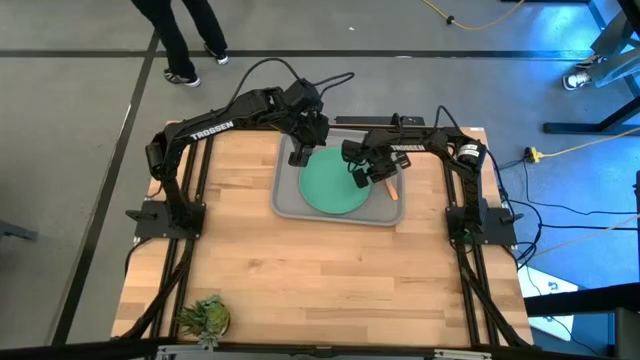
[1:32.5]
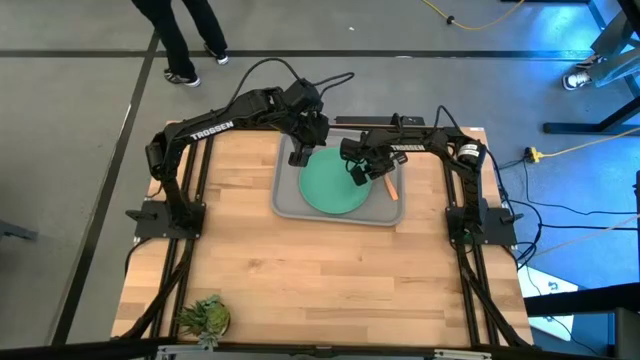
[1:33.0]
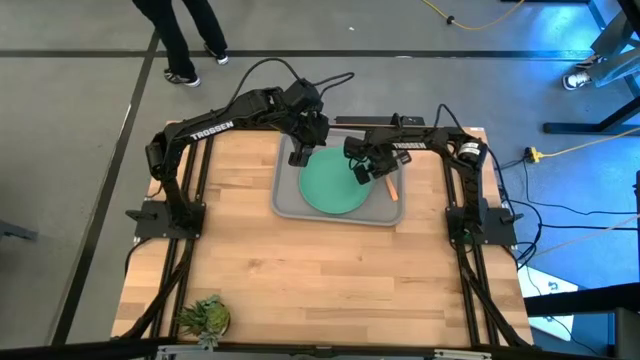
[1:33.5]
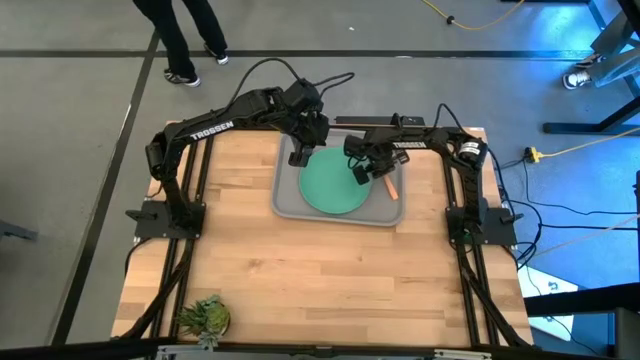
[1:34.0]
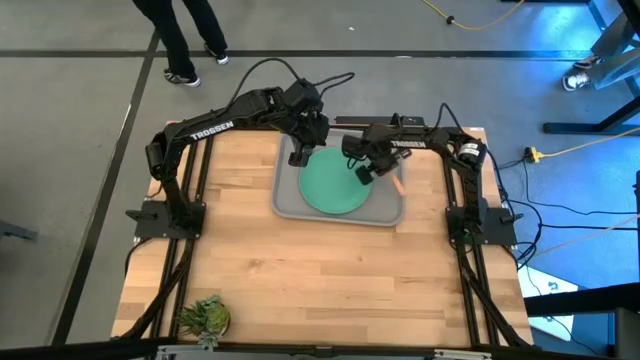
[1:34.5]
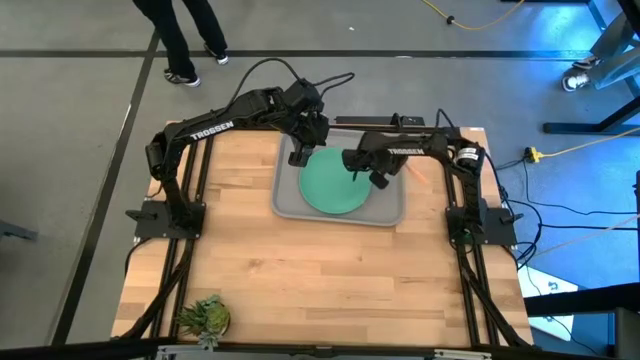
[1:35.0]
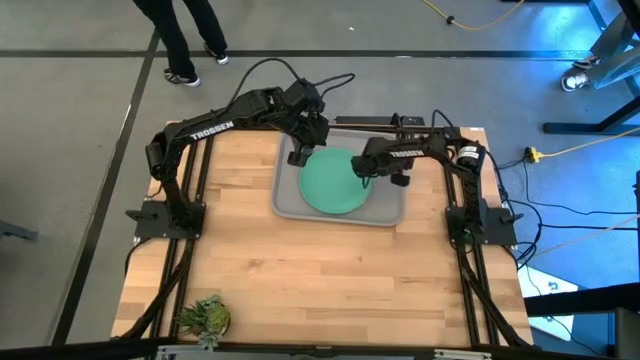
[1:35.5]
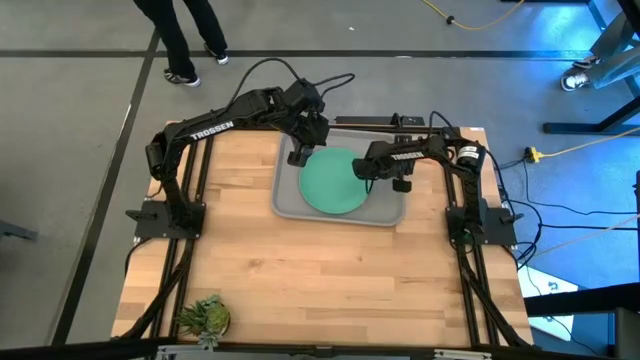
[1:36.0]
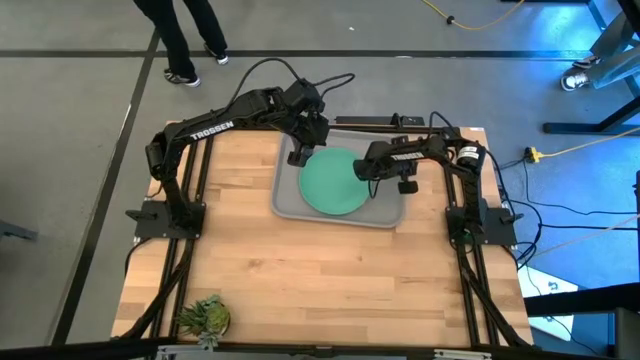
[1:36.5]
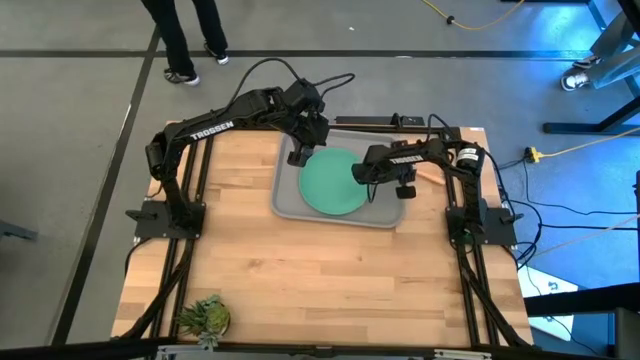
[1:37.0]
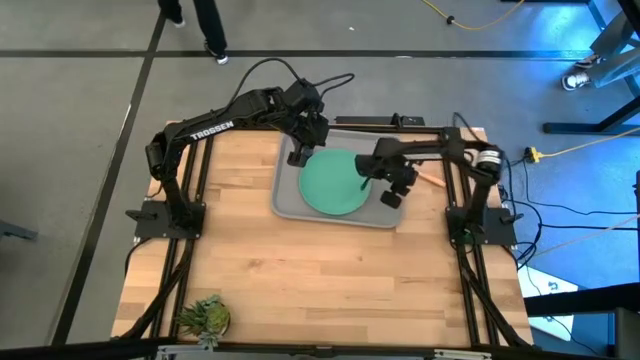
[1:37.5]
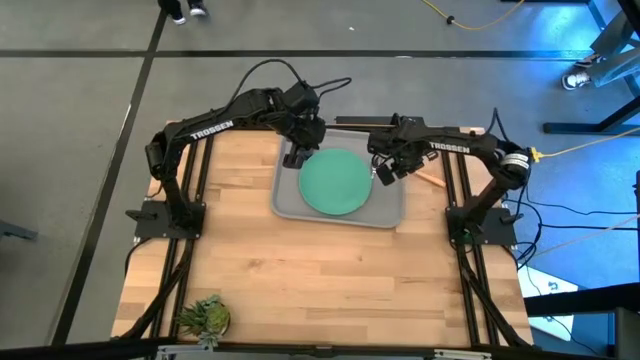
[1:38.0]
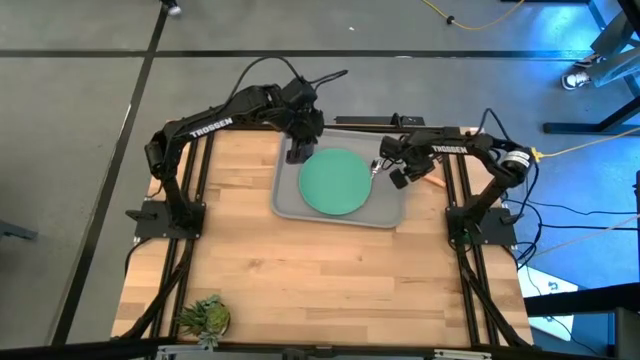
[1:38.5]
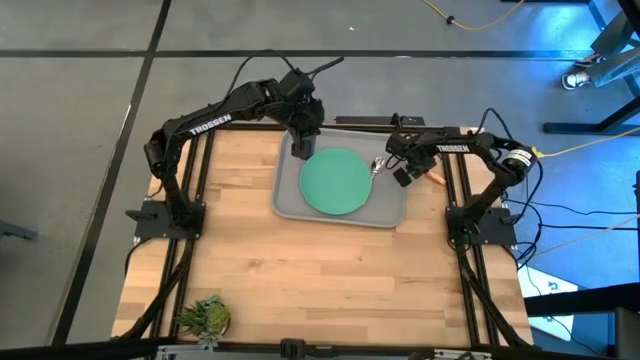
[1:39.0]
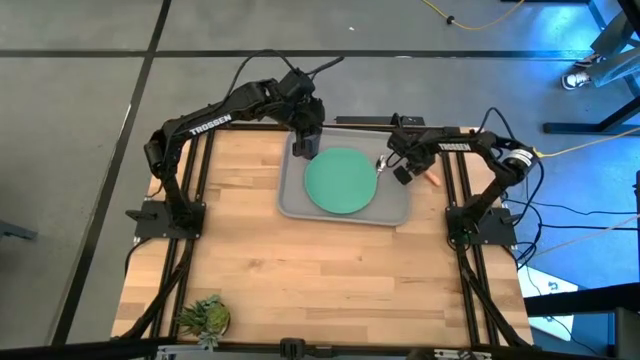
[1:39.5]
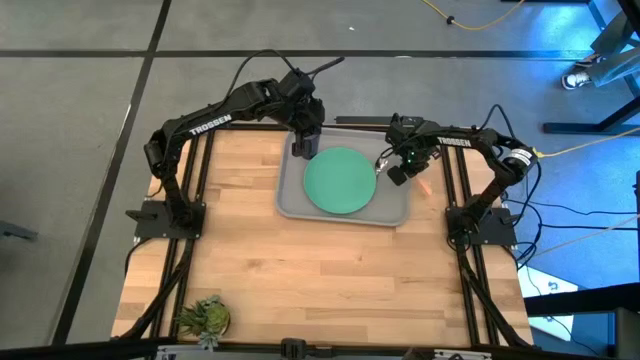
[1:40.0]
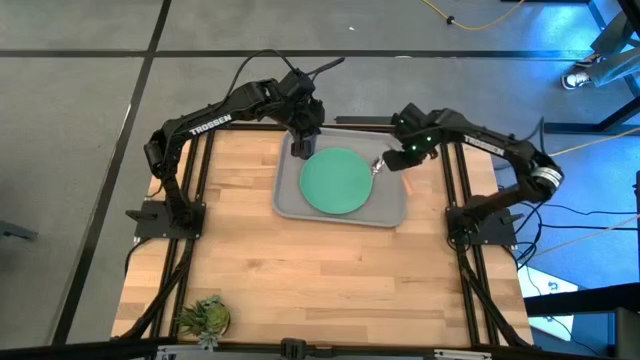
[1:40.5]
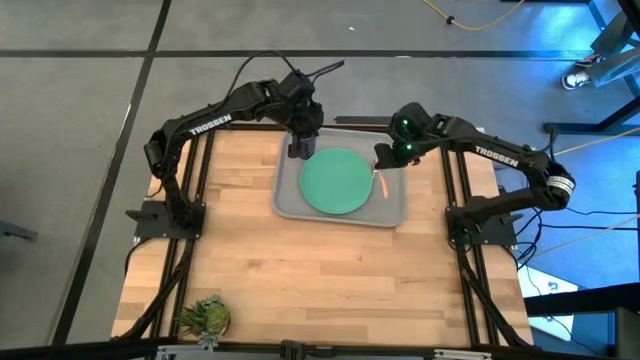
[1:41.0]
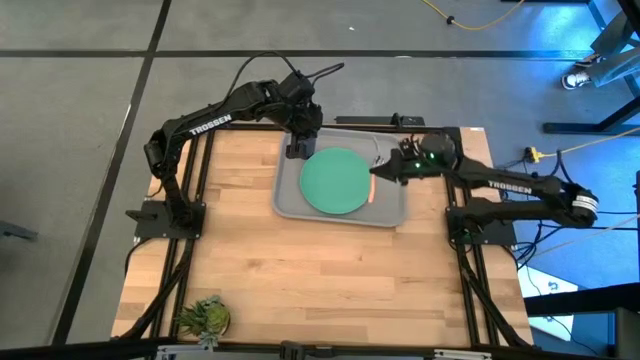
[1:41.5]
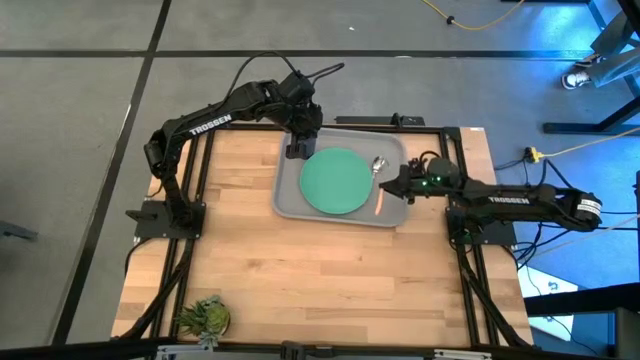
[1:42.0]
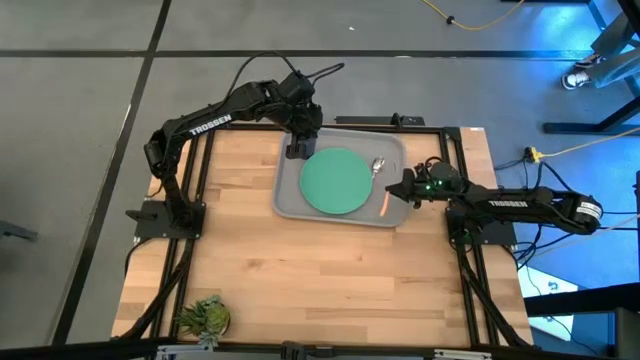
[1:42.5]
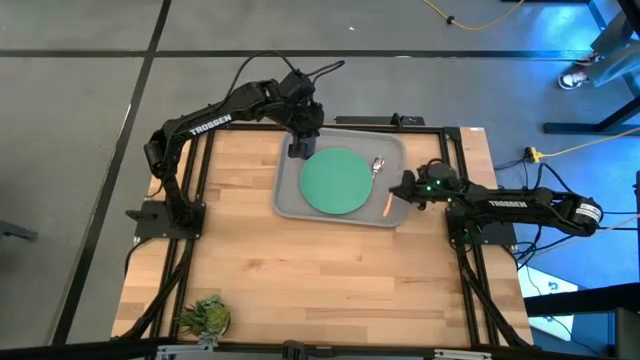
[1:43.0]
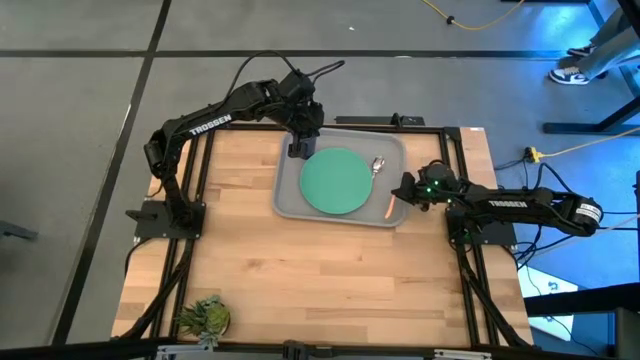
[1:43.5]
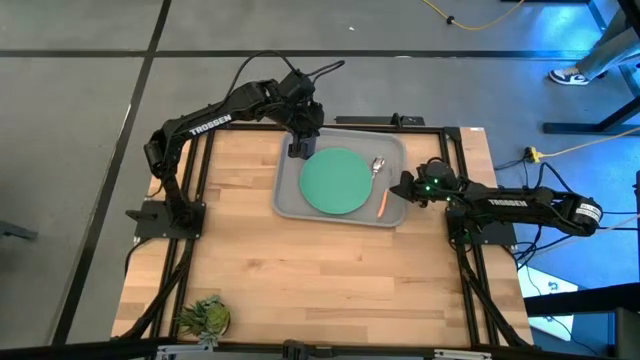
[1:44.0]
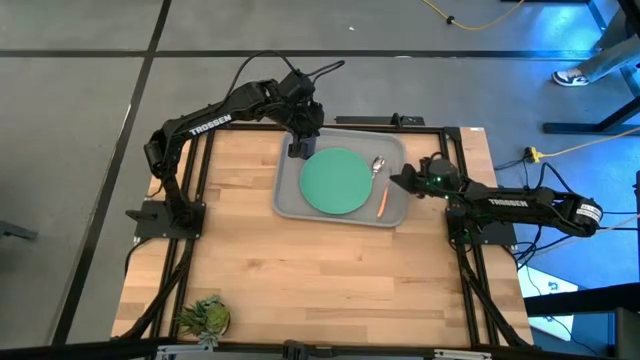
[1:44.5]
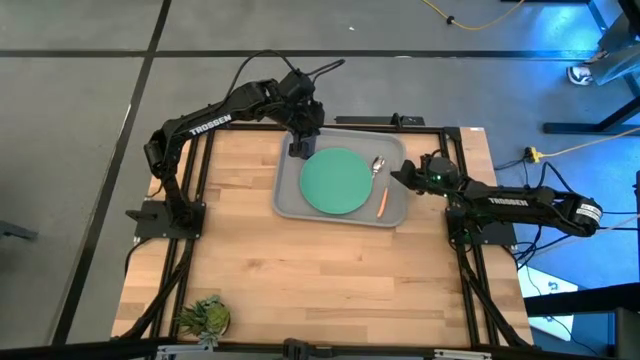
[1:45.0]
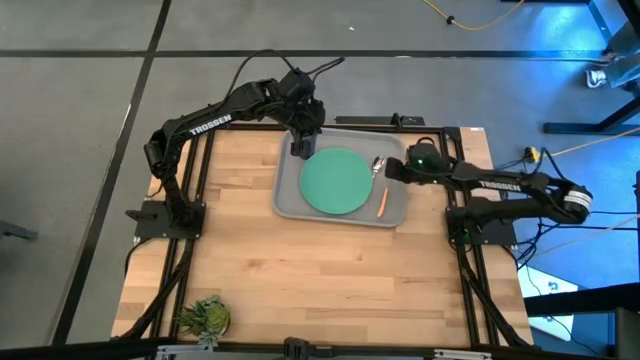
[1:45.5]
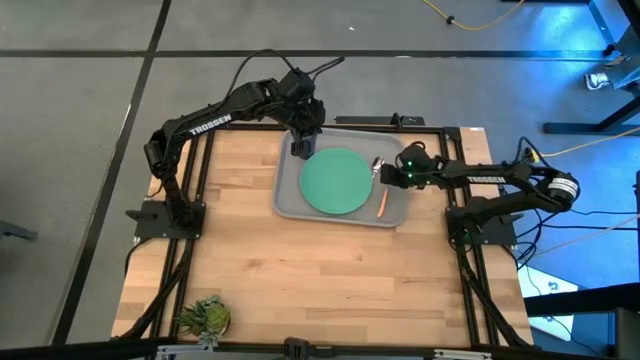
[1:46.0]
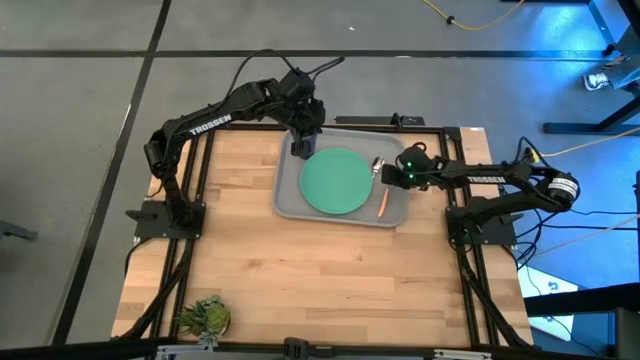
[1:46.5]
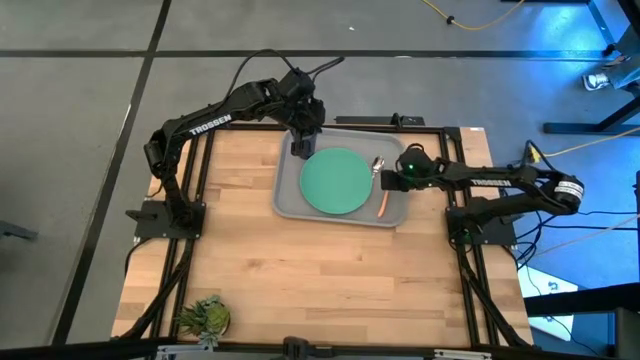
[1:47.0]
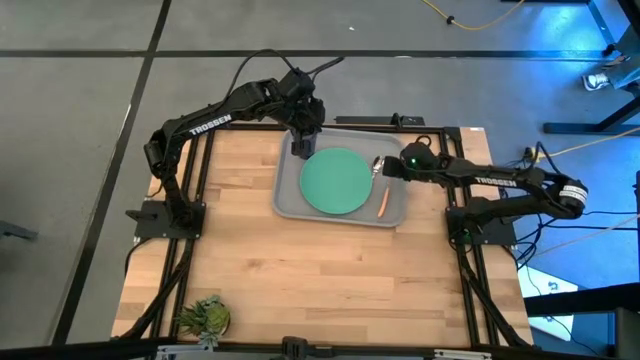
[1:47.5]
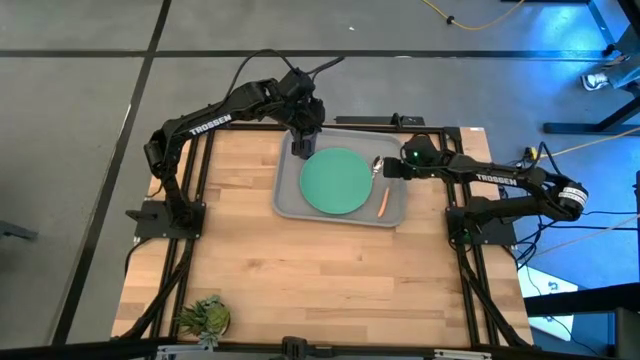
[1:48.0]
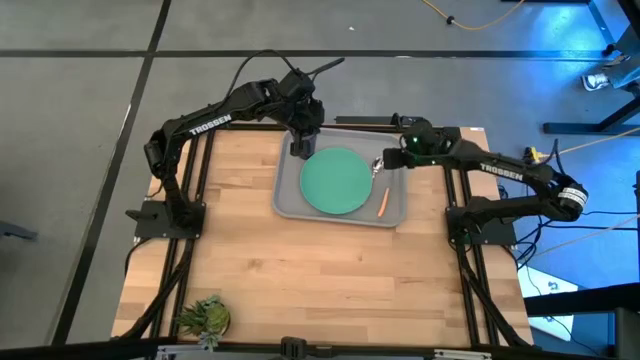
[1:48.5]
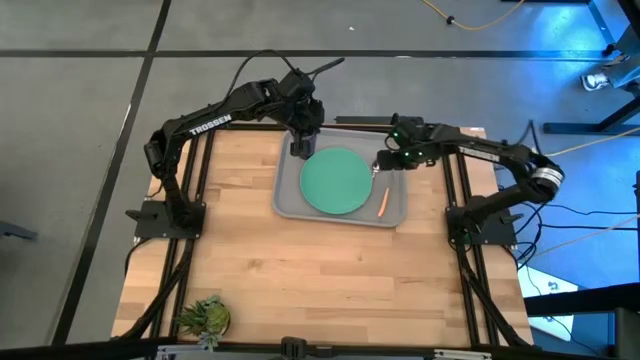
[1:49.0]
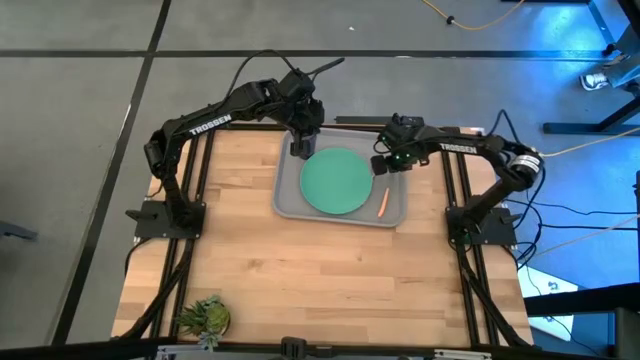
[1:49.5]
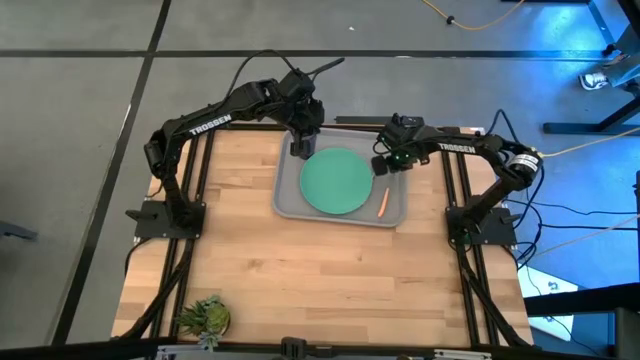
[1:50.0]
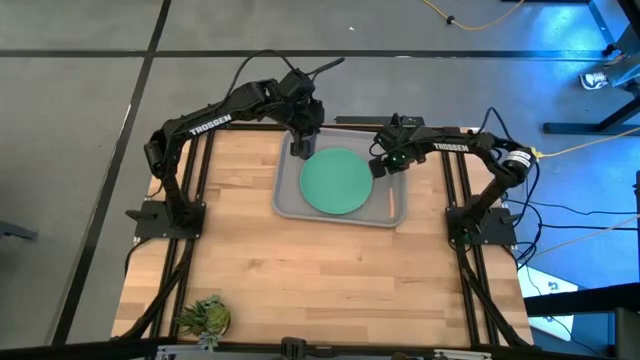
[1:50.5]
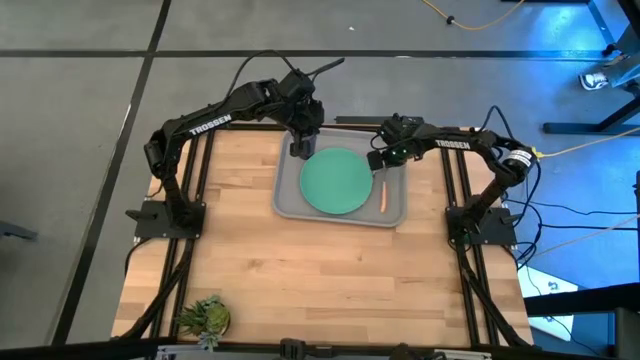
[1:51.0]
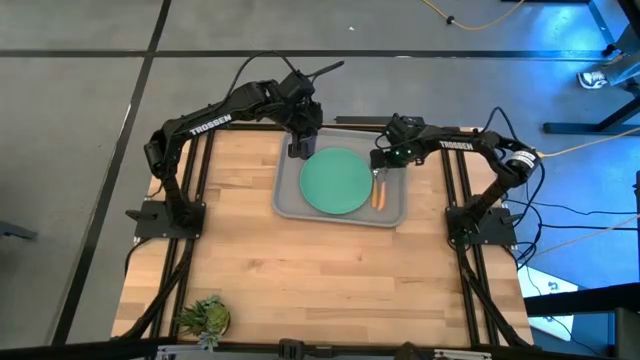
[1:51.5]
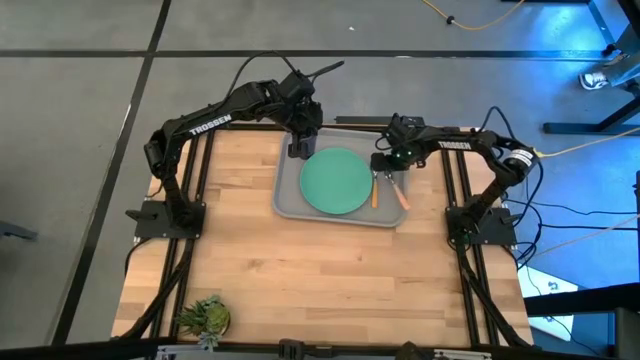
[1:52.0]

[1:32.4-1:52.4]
Task: Pick and place plate/cup/fork/spoon on tray
Put the yellow fork on the gray tray to the right of the yellow spoon

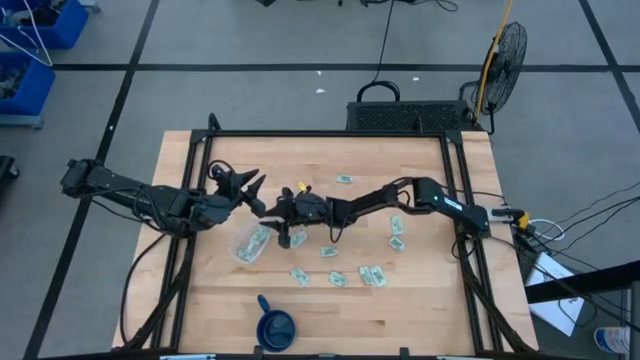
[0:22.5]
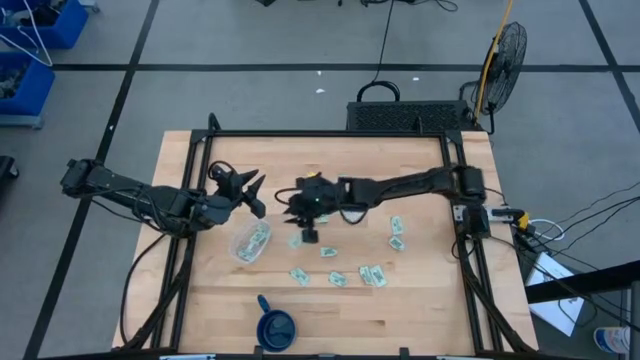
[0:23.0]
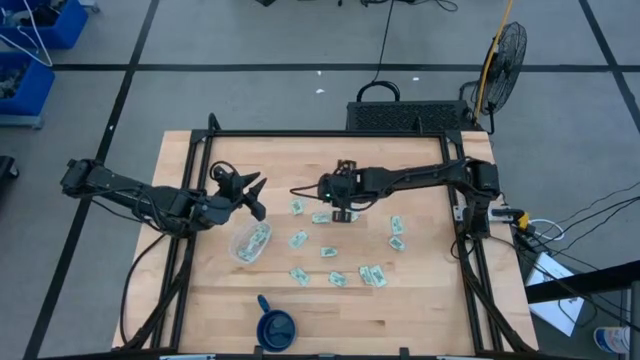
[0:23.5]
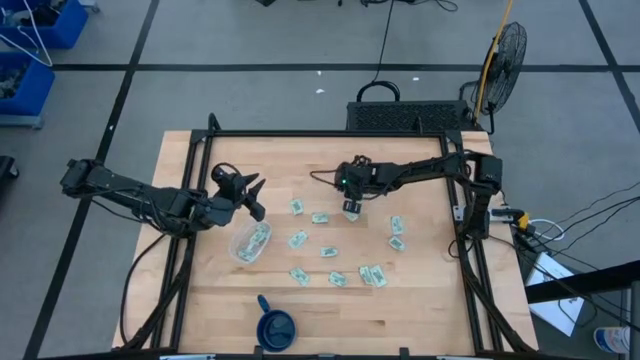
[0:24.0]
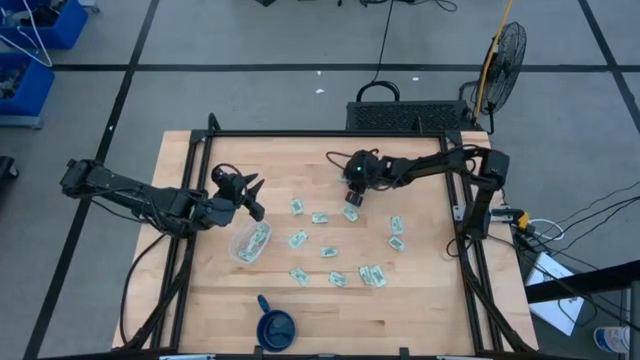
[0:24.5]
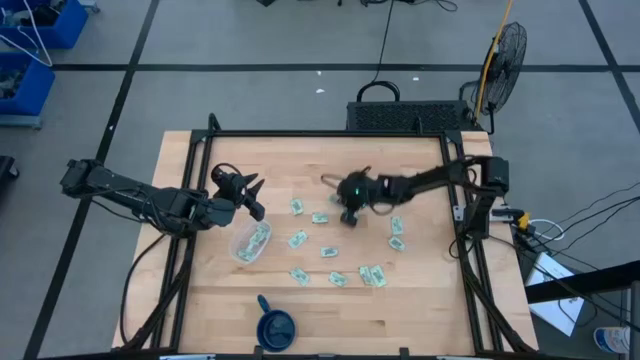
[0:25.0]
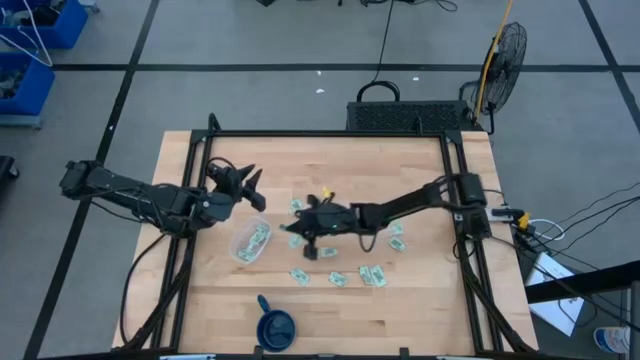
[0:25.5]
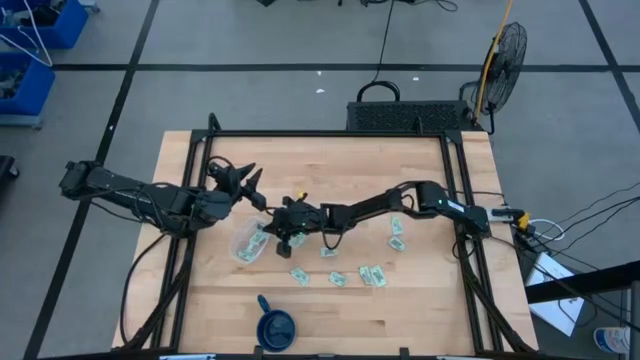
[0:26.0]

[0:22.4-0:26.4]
Task: Pick and place Stevia / Truvia into bins
Put the stevia packet into the transparent container
